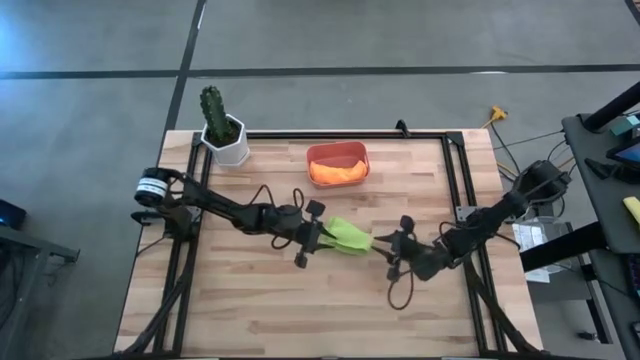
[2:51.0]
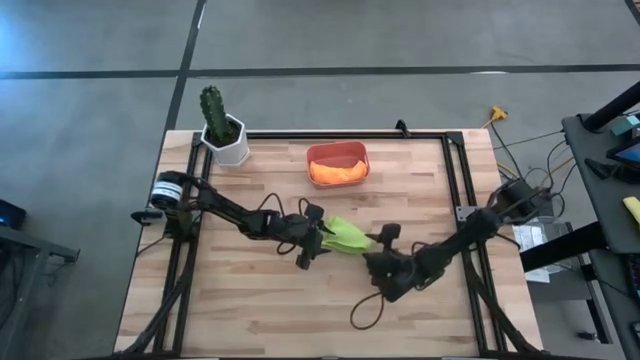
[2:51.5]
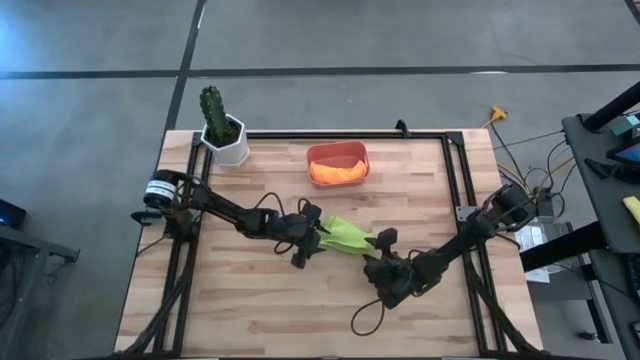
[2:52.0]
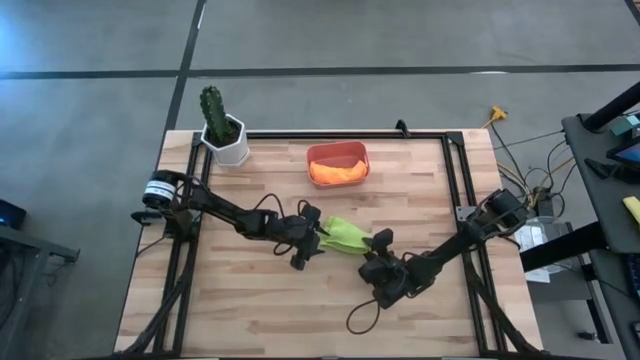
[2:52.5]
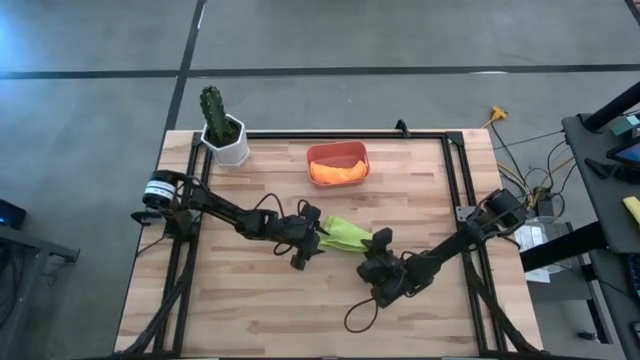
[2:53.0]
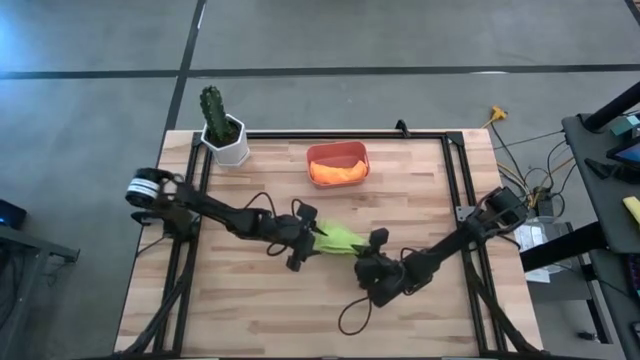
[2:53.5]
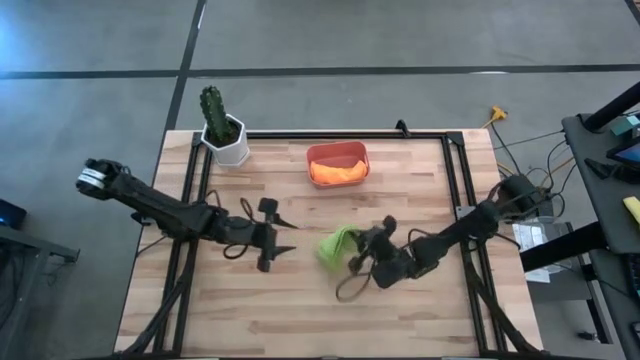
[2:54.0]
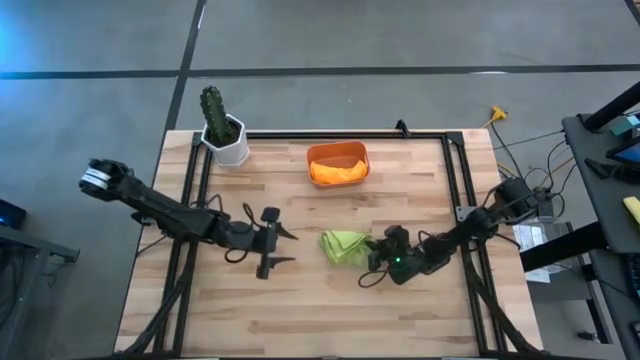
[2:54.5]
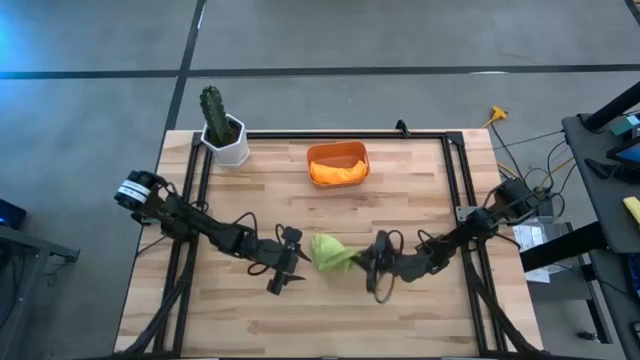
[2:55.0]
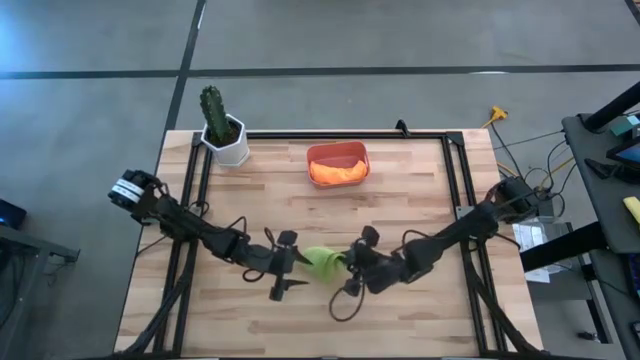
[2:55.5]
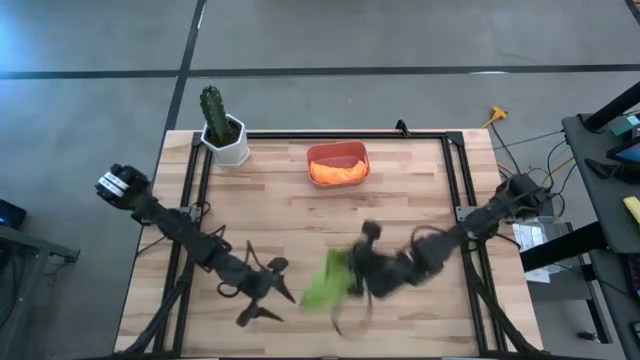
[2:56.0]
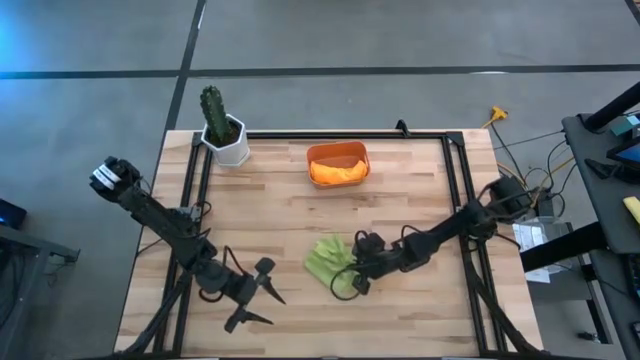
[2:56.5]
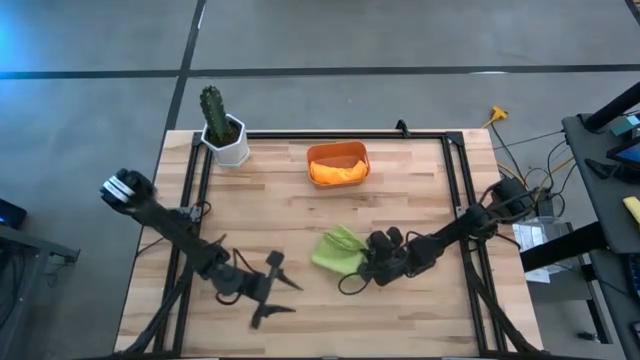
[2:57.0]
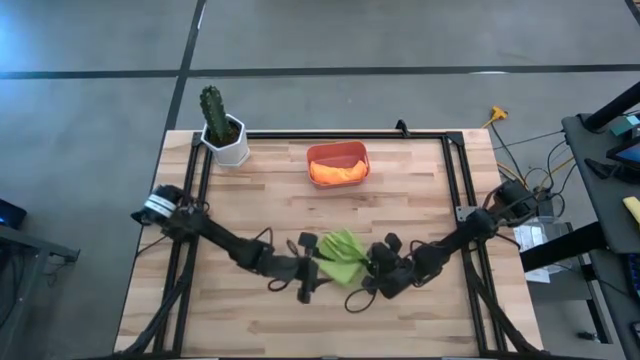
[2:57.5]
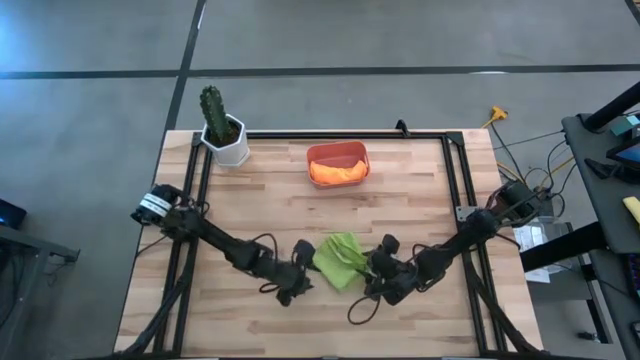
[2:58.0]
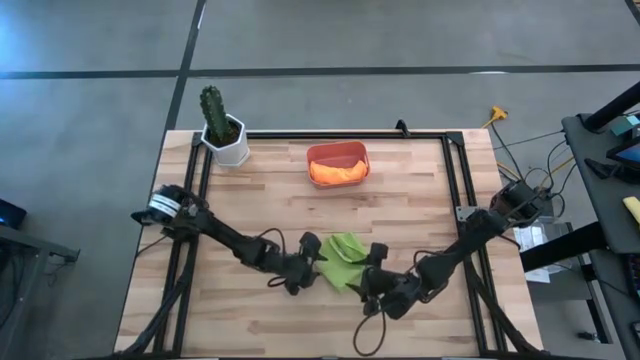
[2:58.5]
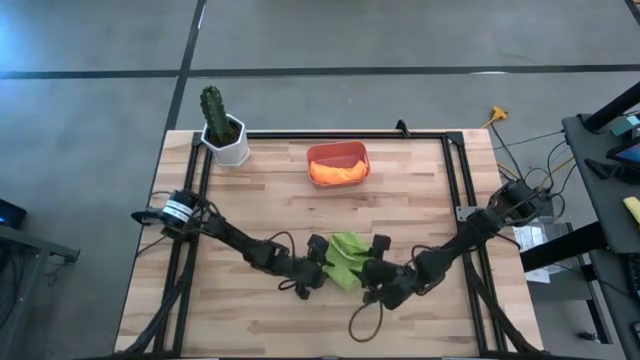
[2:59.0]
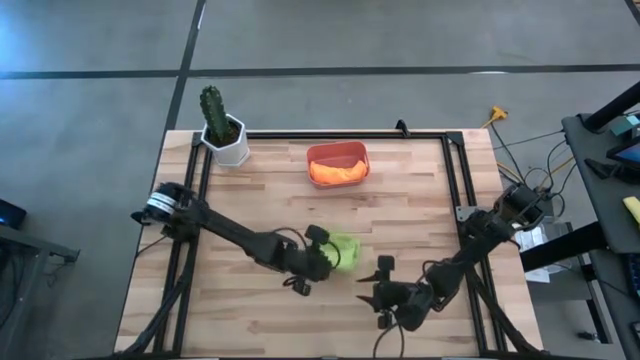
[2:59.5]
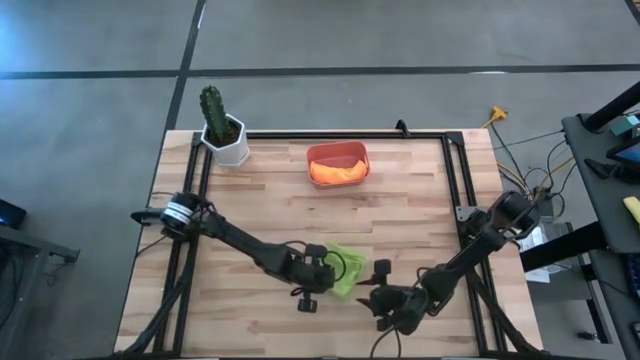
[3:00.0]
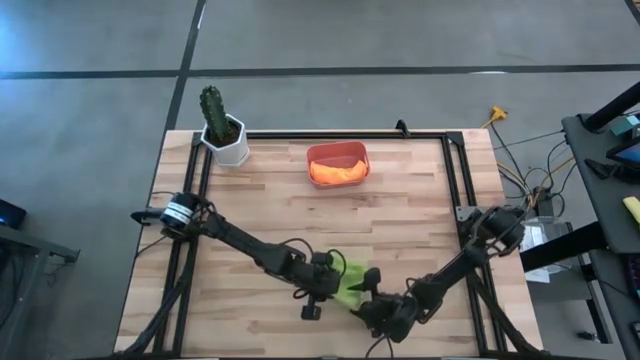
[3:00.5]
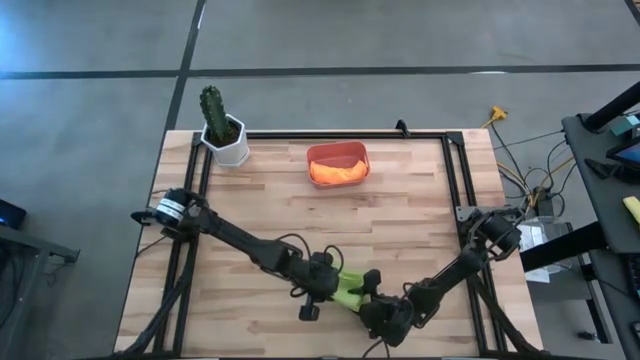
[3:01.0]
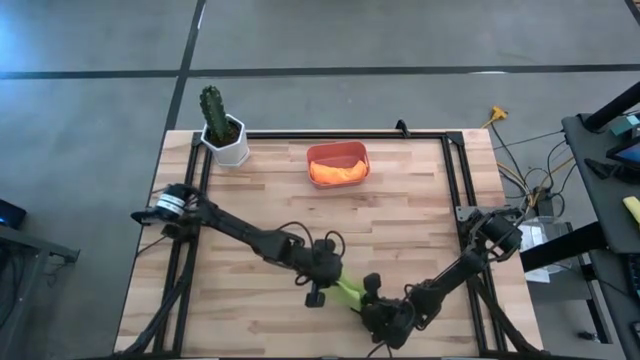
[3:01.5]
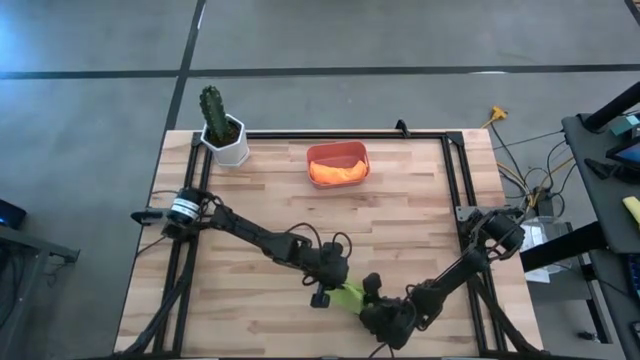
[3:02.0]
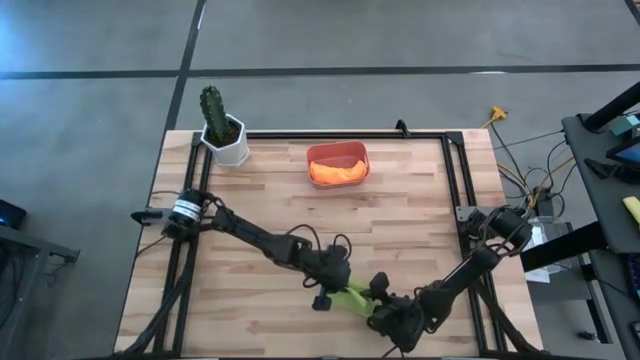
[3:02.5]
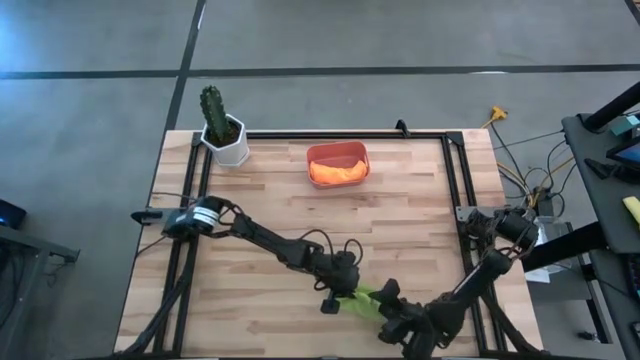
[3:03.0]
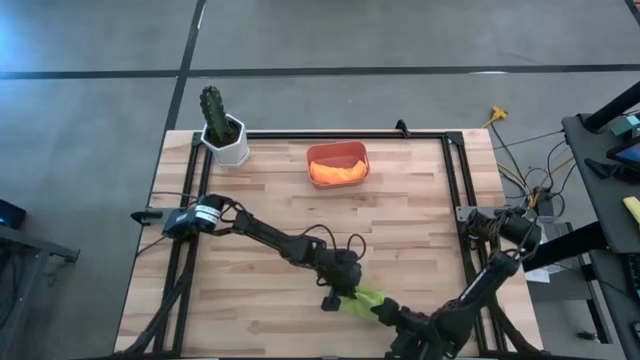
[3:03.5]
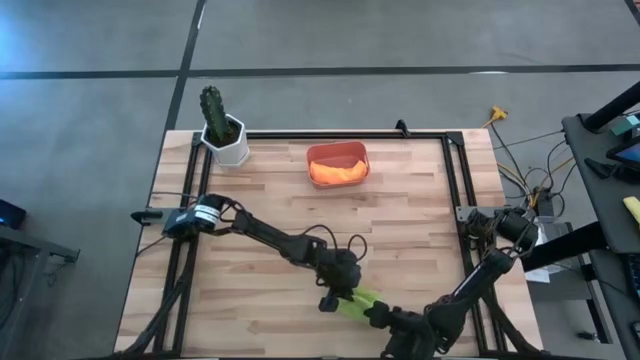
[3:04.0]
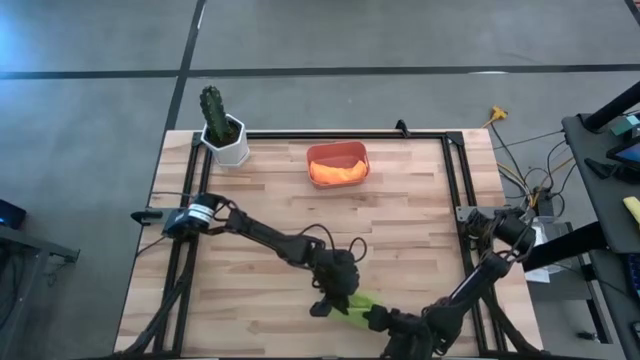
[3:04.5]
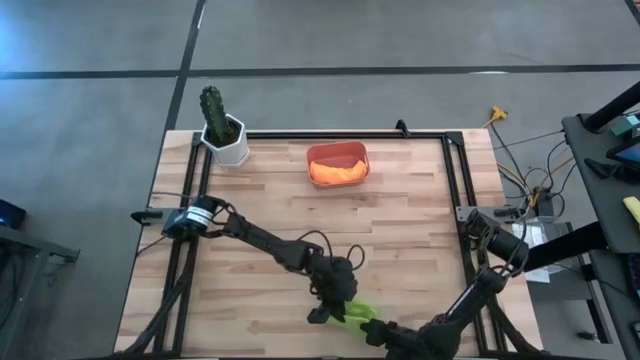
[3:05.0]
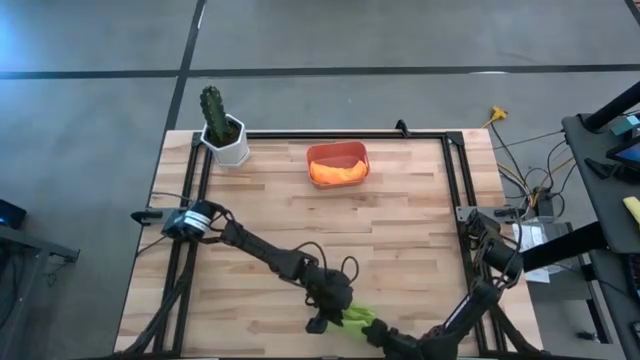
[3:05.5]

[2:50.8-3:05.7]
Task: Roll microfiber towels into tight, uniform cylinder then place into a basket
Roll the green microfiber cloth

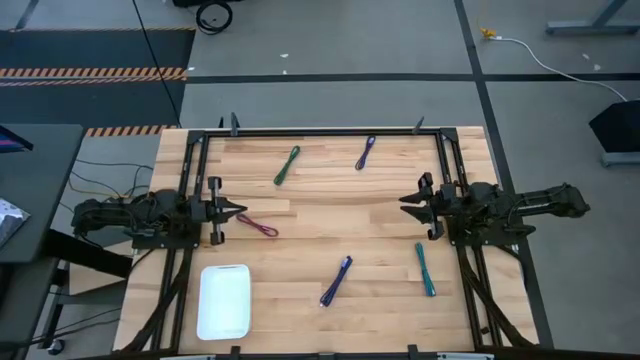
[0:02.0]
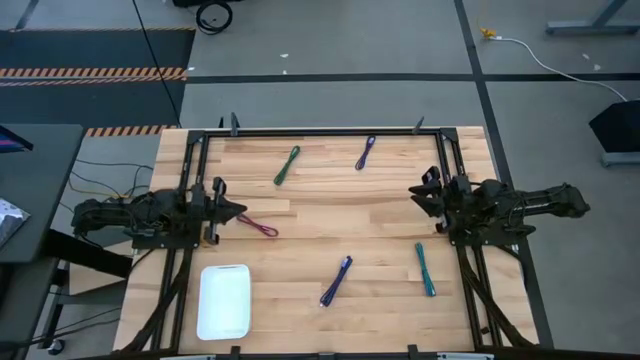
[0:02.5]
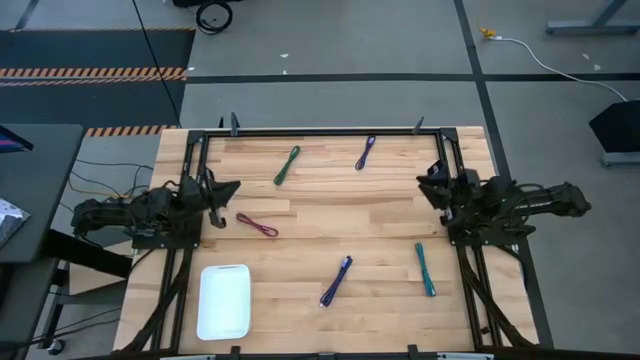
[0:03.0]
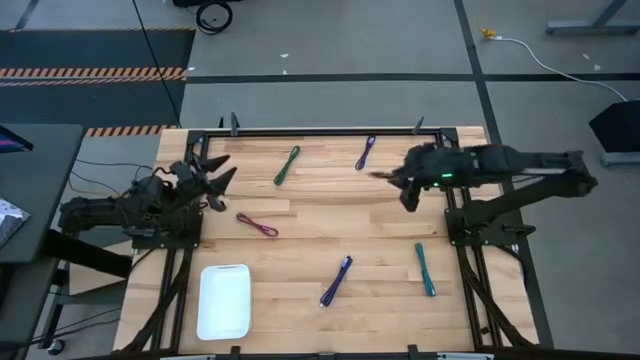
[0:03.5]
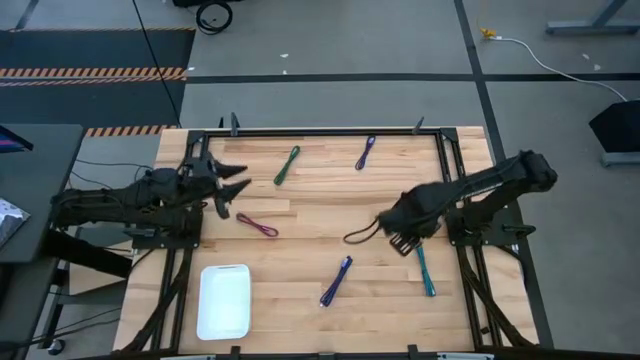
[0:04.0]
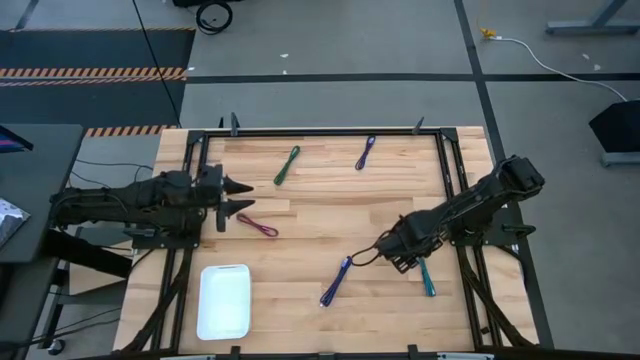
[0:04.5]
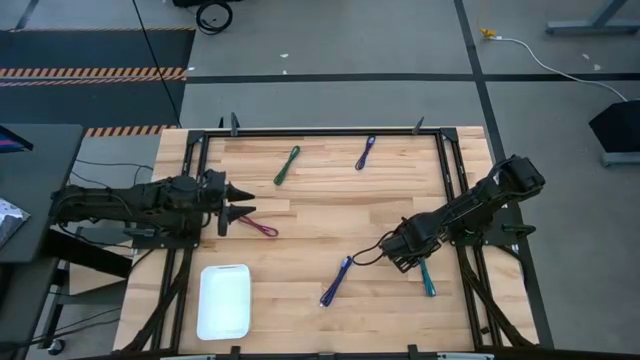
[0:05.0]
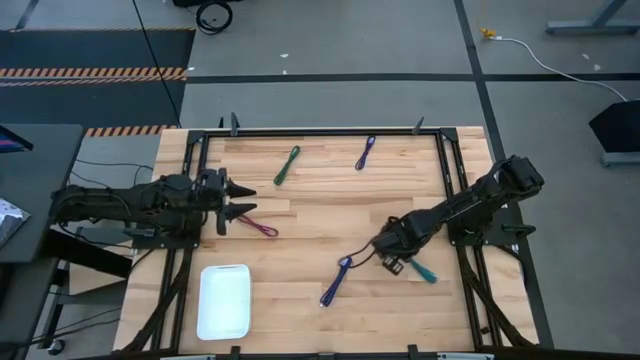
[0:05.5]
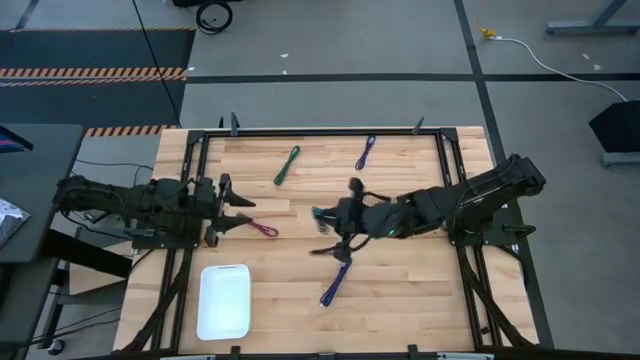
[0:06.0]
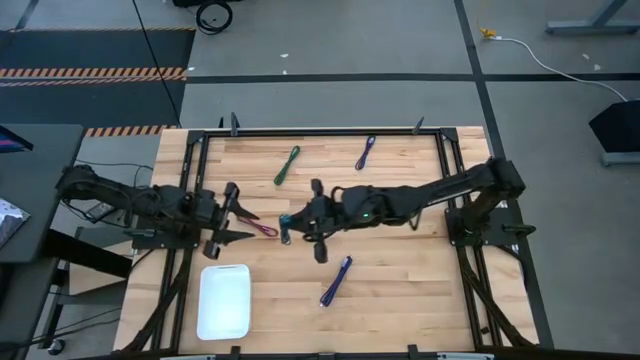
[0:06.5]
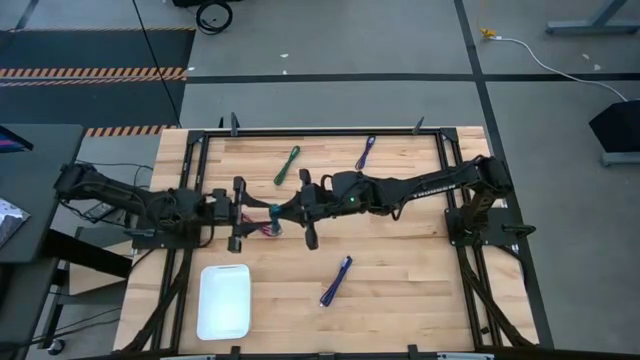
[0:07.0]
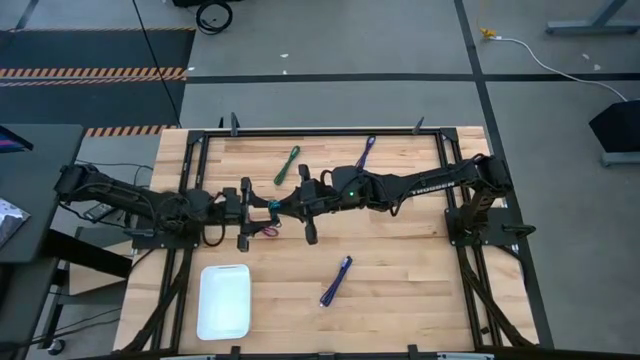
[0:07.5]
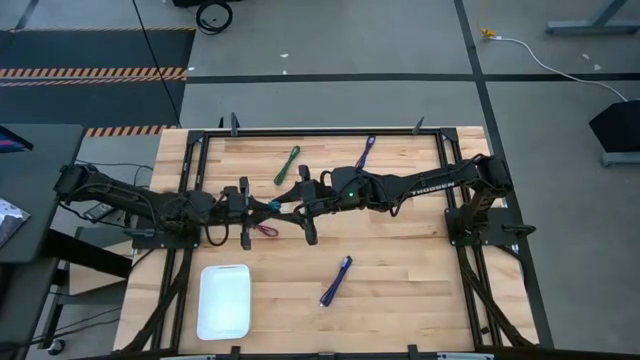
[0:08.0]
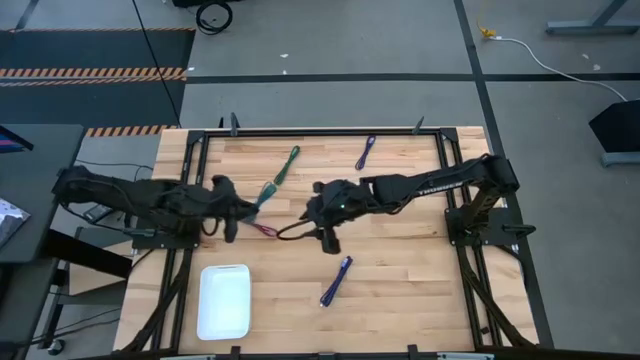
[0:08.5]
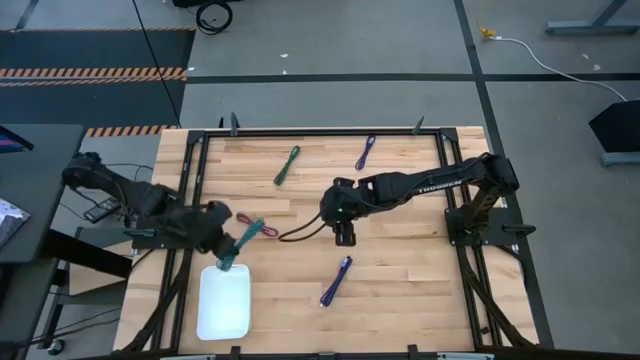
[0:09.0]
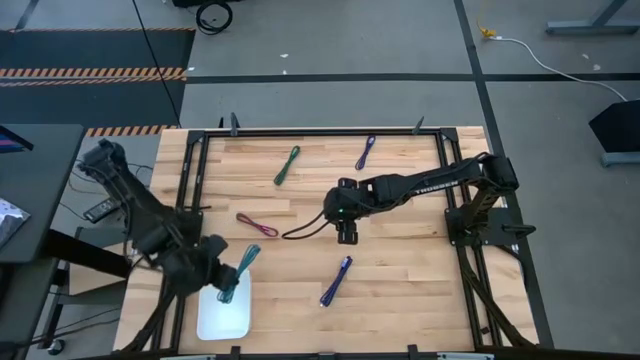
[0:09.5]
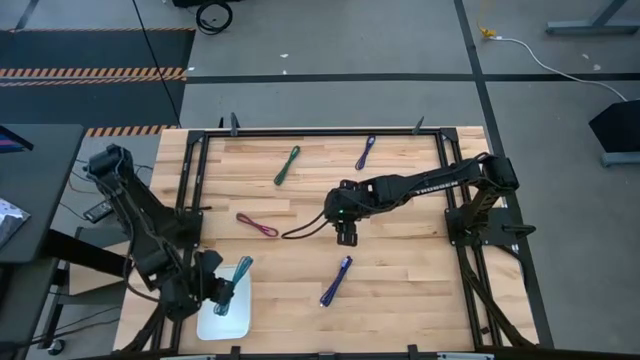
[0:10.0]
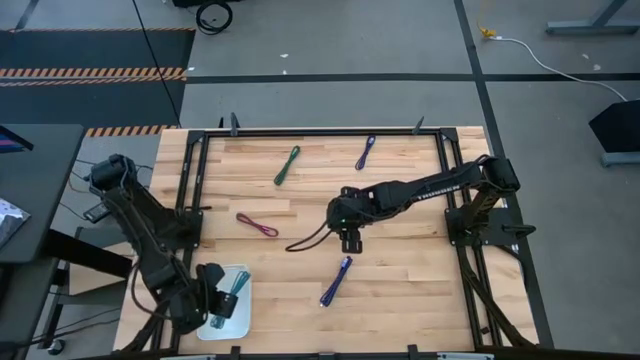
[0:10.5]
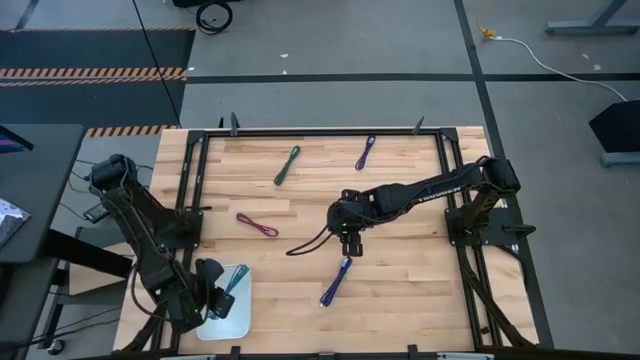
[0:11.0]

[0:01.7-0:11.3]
Task: Pick and place USB-C Cables
Put the light blue charger cable into the bin
